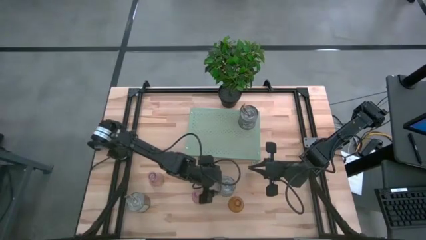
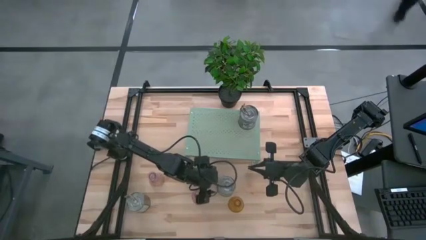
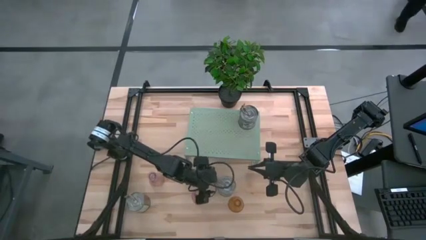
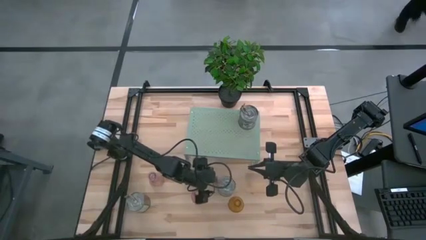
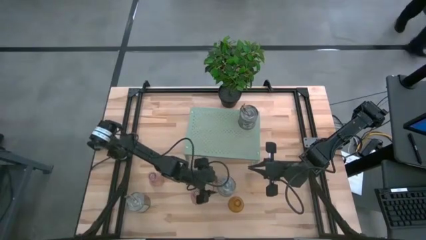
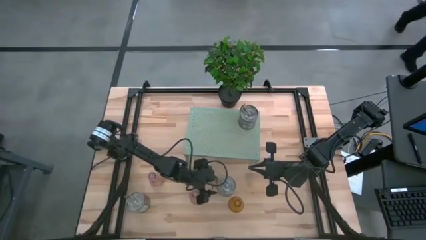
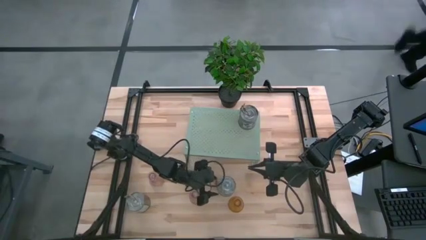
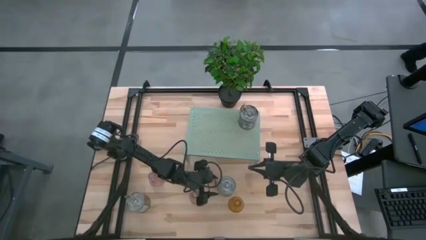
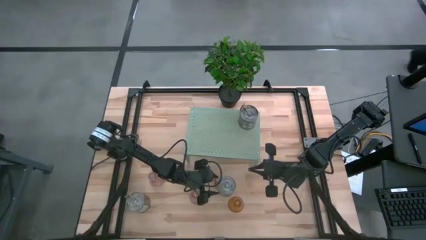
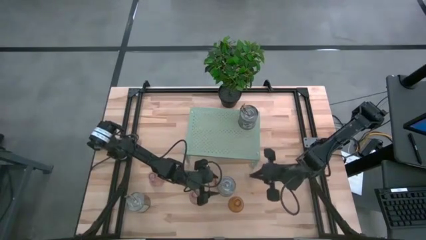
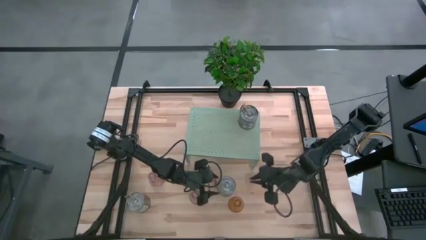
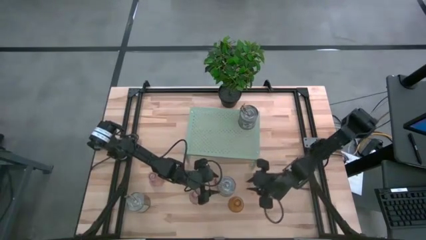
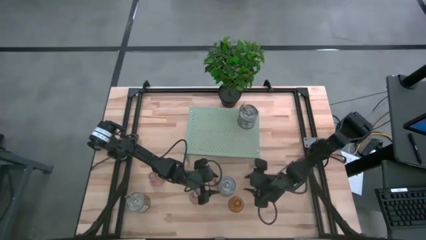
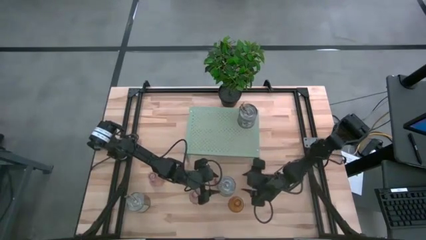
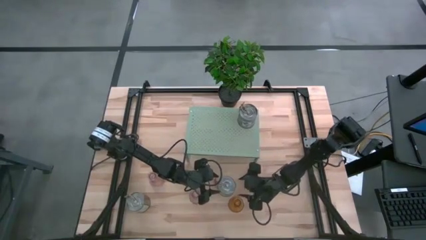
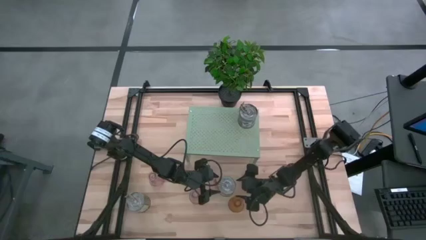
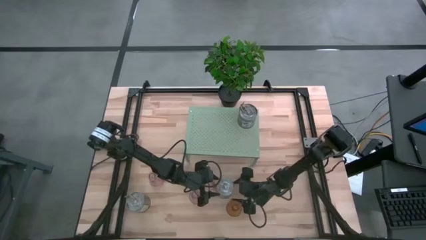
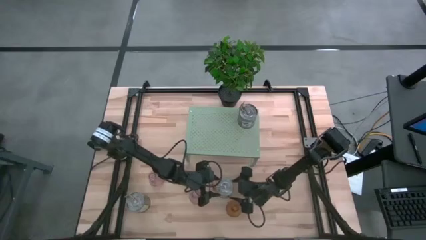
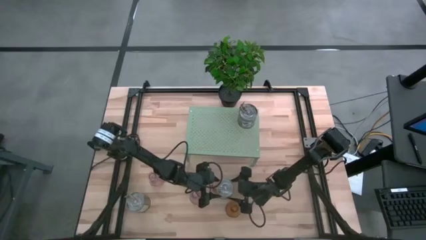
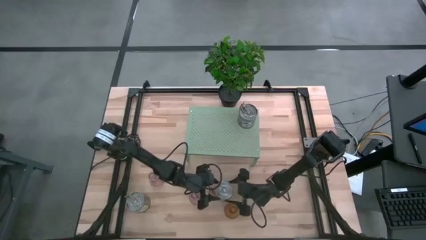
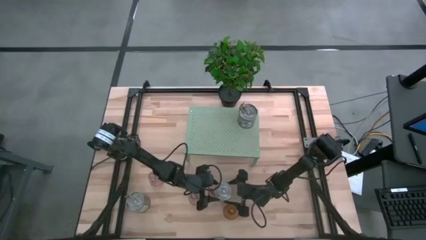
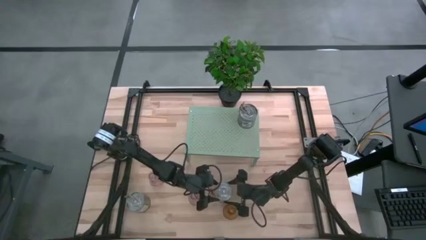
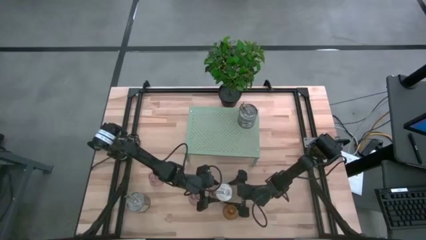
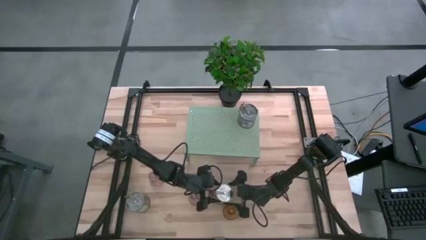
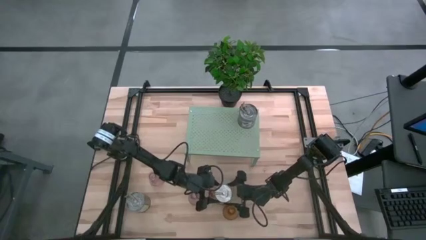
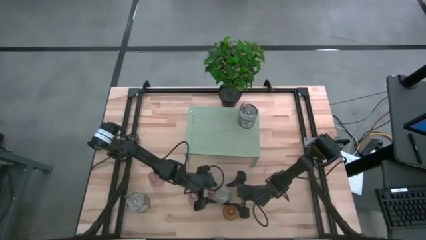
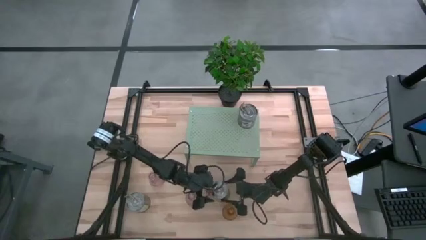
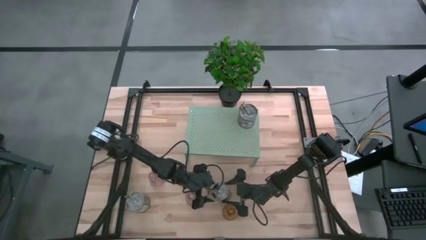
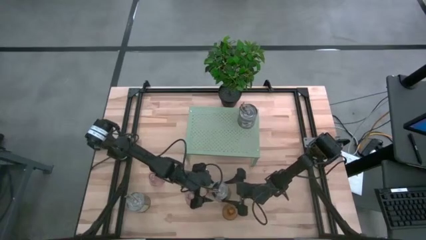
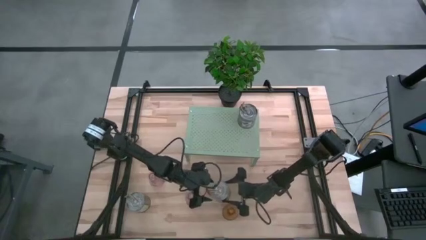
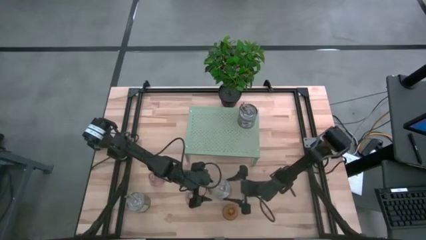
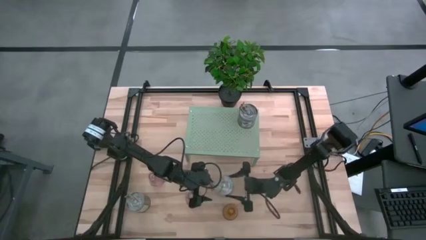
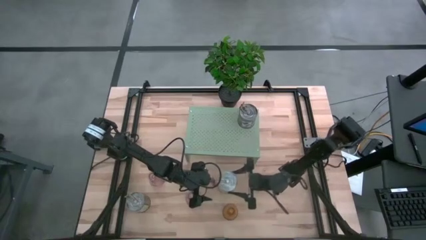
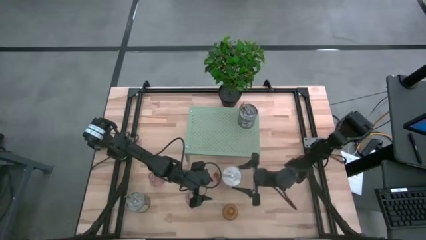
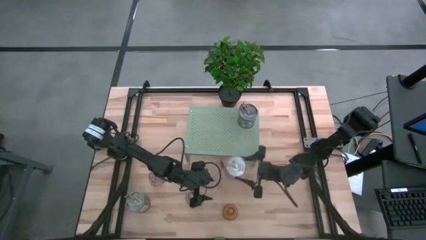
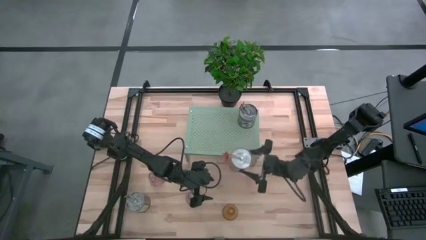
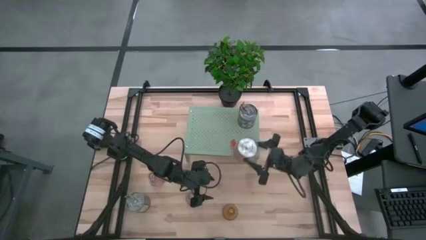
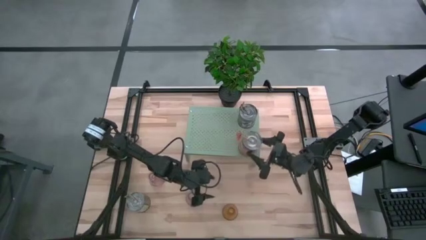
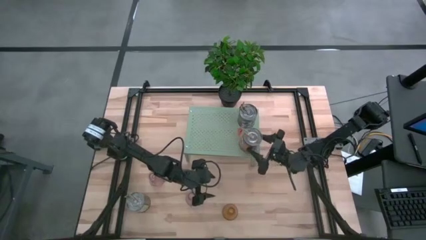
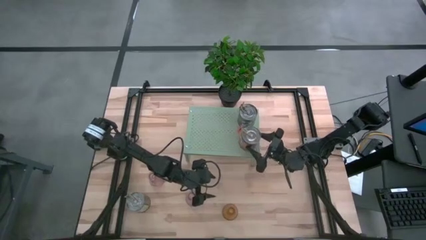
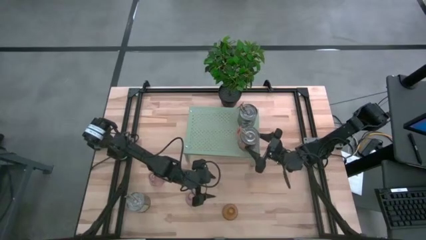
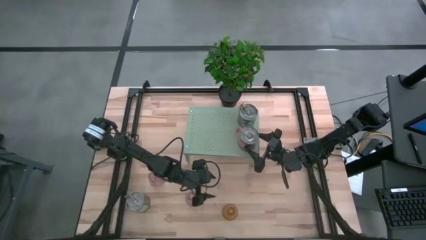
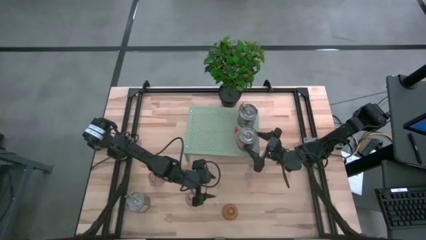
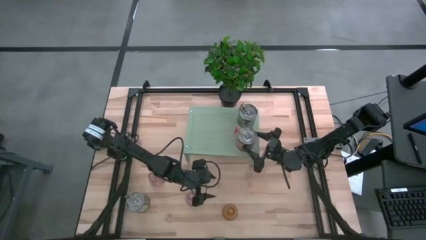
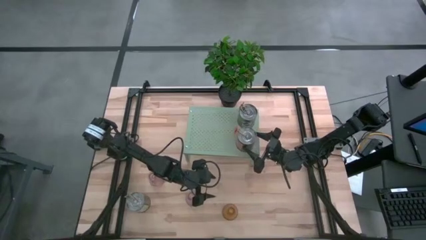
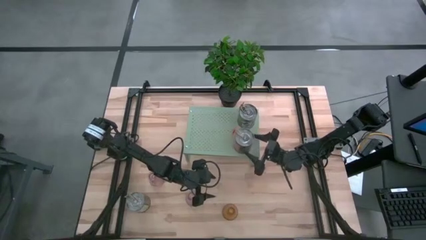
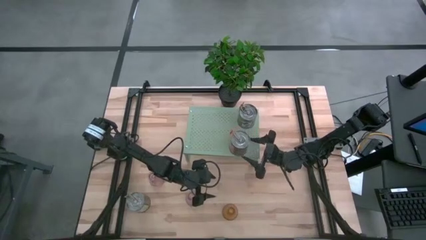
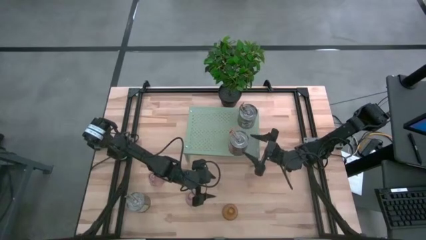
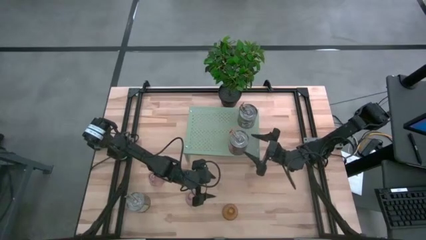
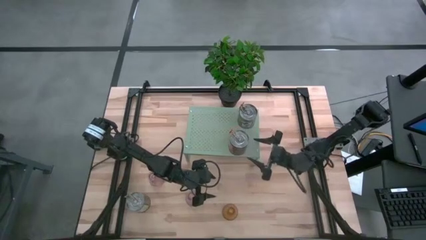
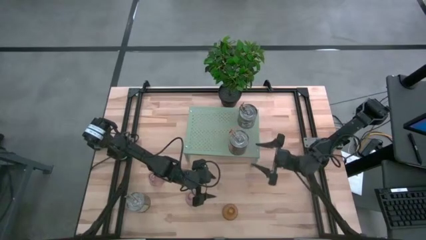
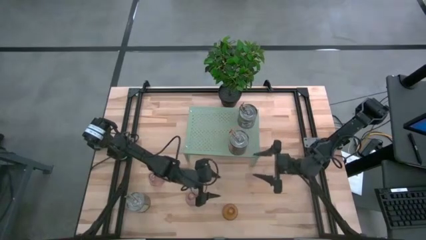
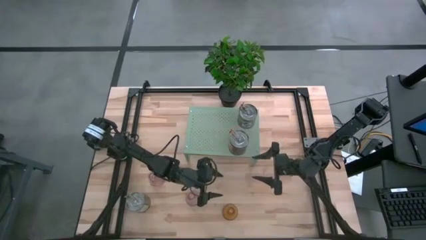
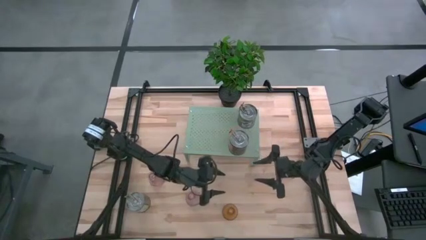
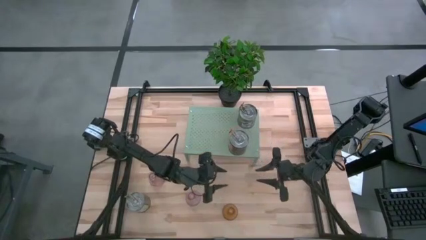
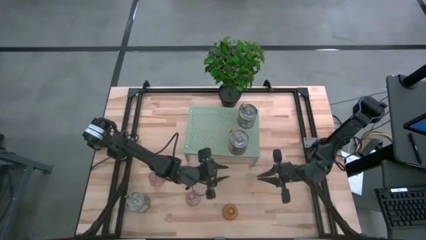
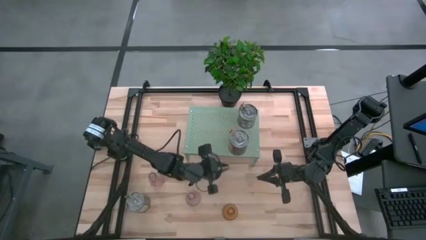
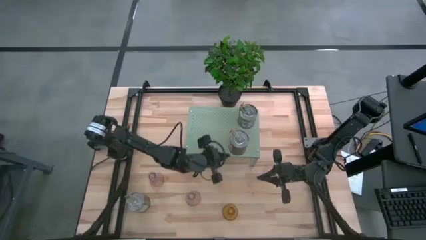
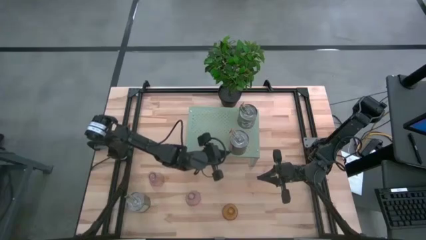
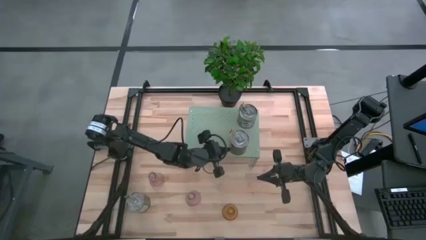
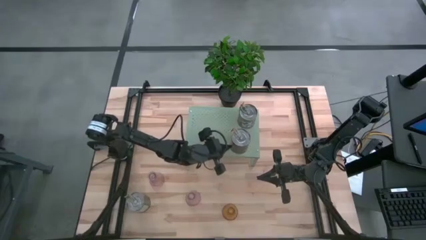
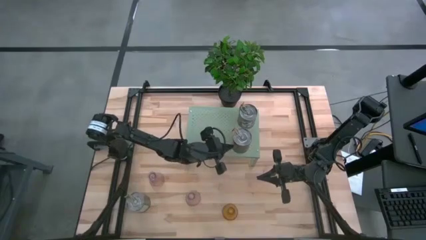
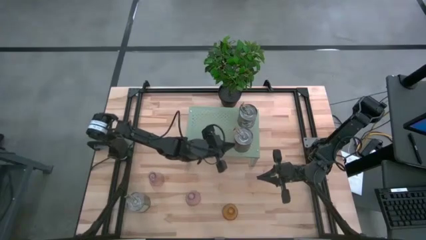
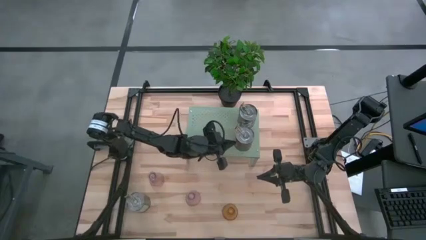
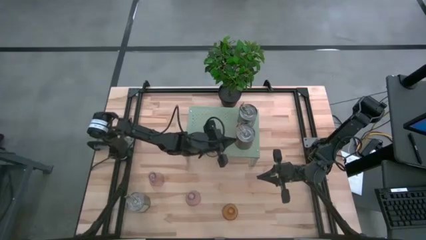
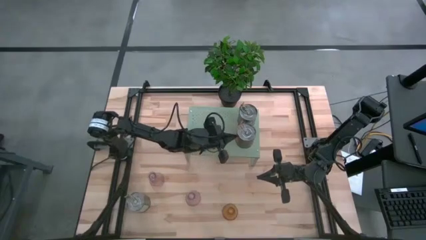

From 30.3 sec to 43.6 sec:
Task: Pick & Place candle stick holders
Align the left silver candle with the other silver candle on the shelf

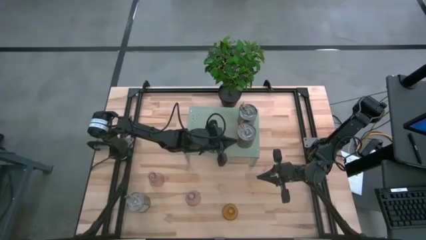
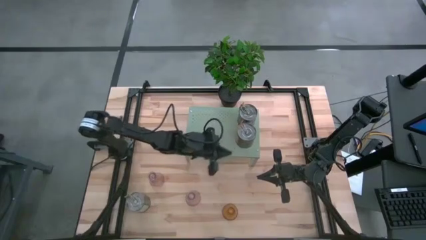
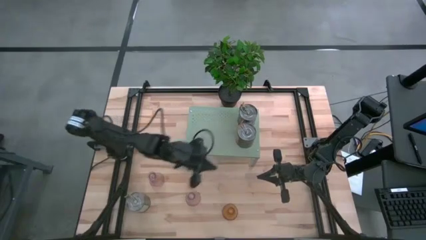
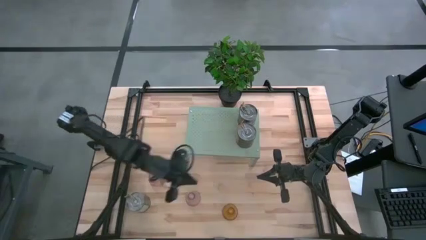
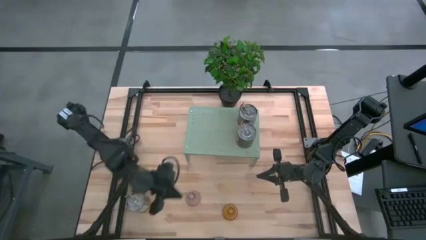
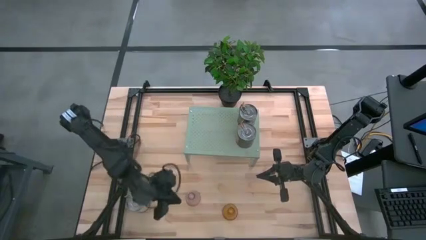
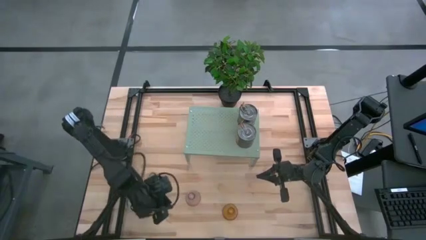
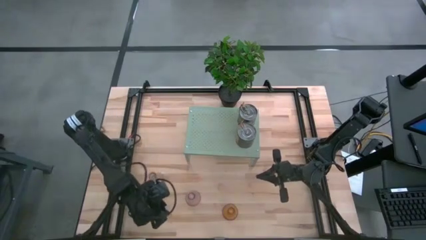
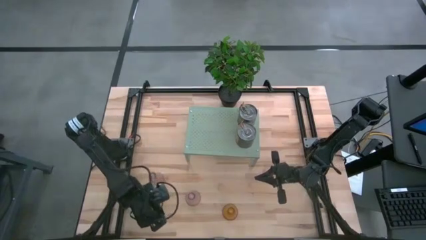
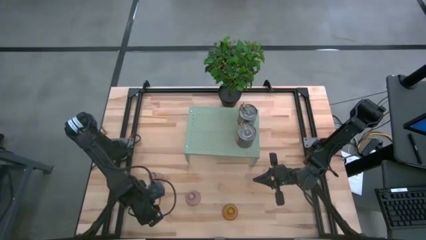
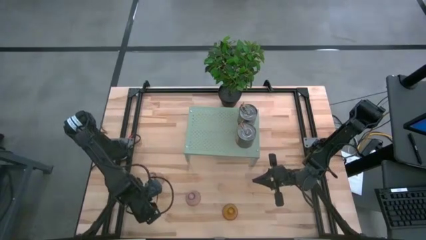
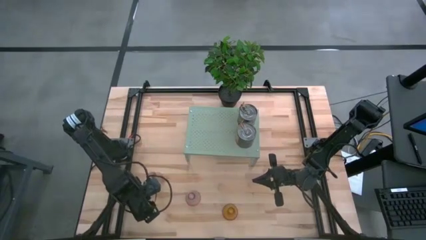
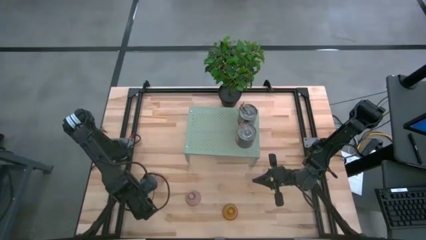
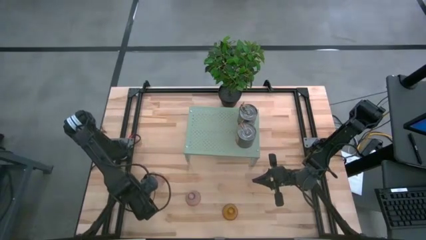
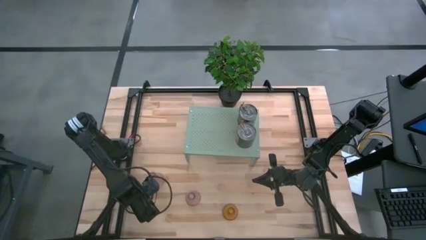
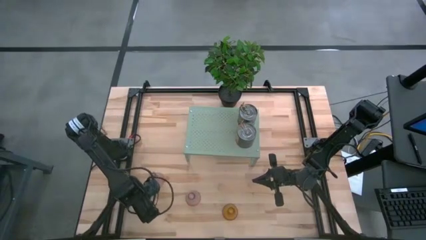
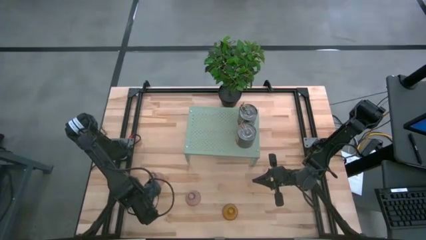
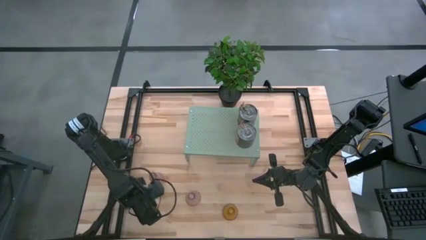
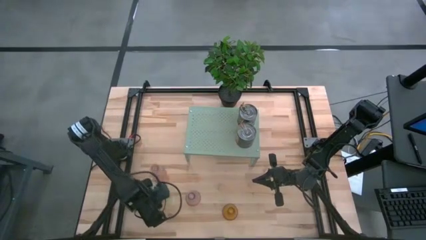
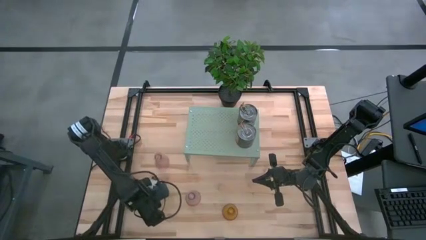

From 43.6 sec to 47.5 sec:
Put the silver candle on the shelf
